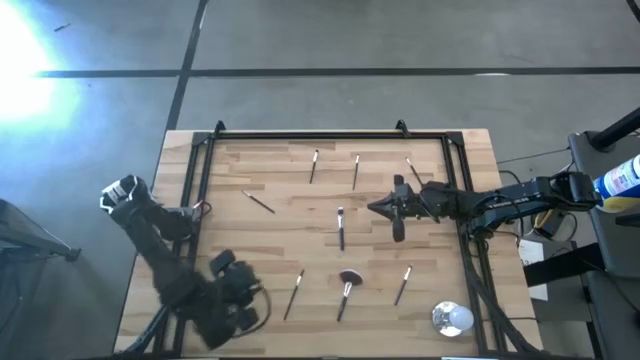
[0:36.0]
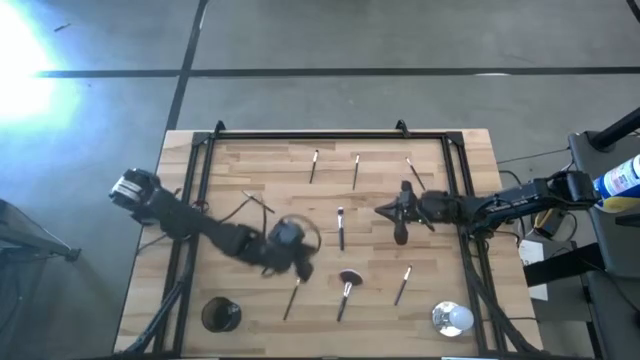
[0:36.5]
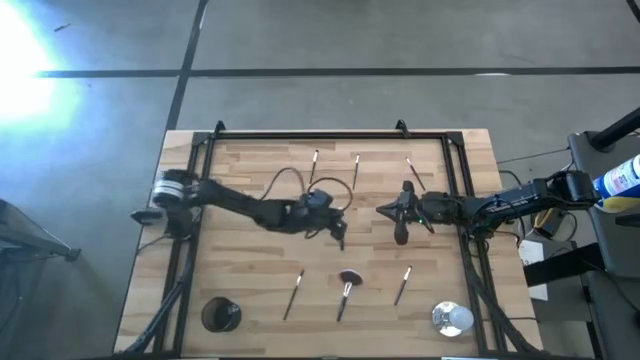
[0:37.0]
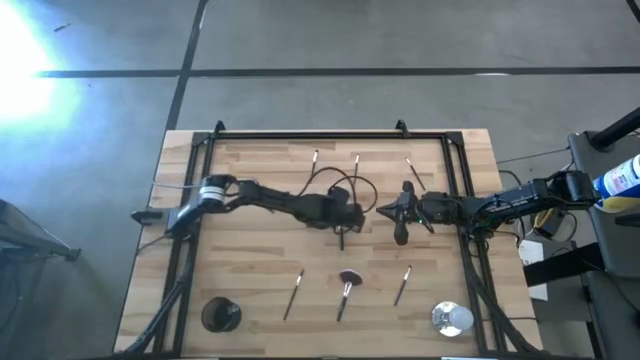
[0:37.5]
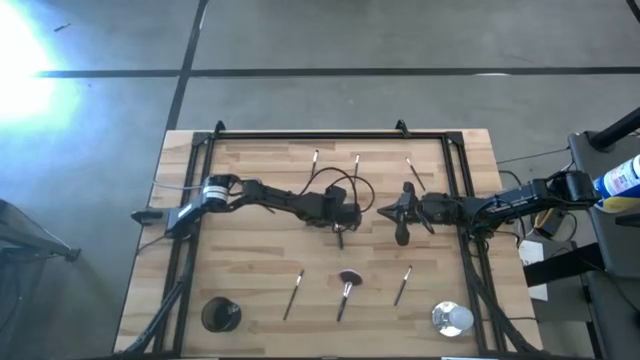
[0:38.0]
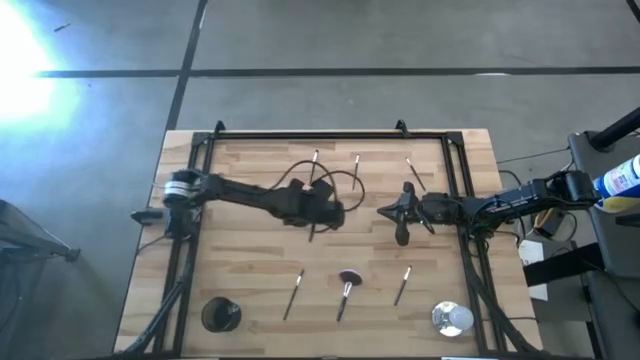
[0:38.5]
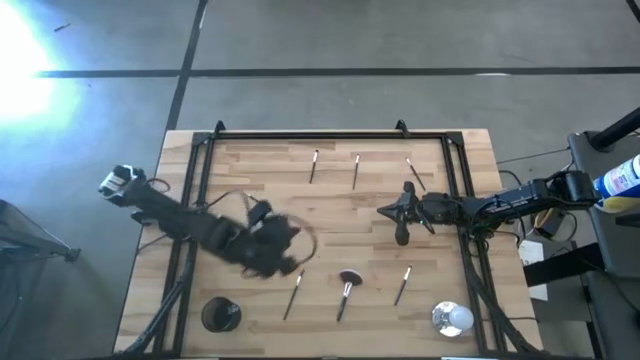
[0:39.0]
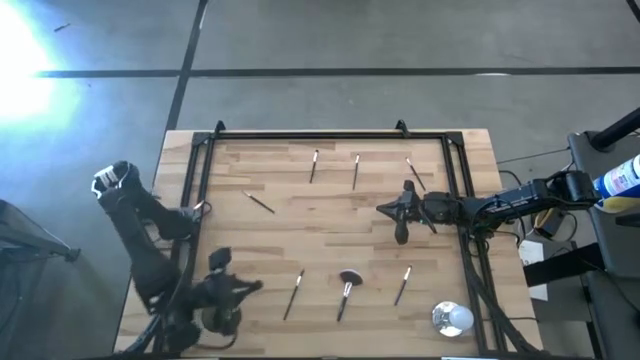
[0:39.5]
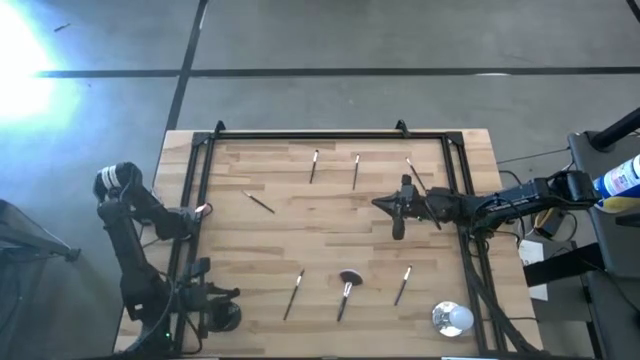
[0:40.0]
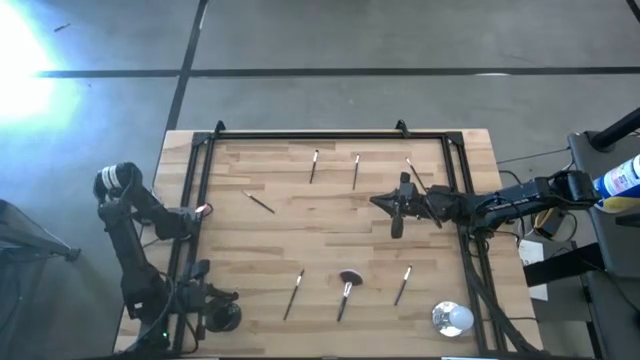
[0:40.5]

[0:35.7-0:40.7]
Task: Pick & Place Makeup Brushes
Put the black blush brush into the makeup holder

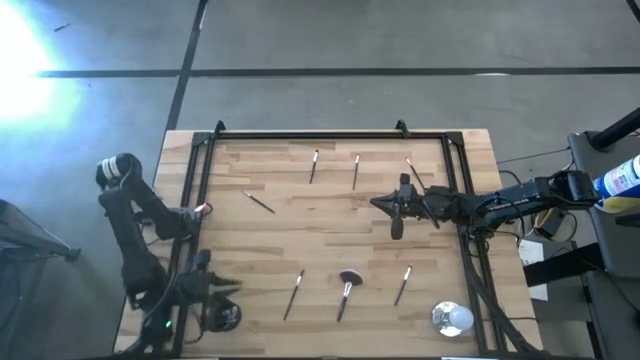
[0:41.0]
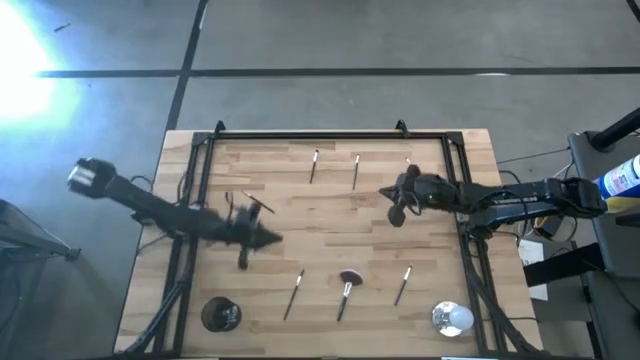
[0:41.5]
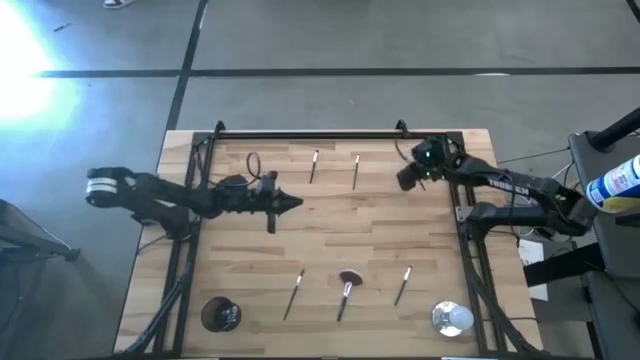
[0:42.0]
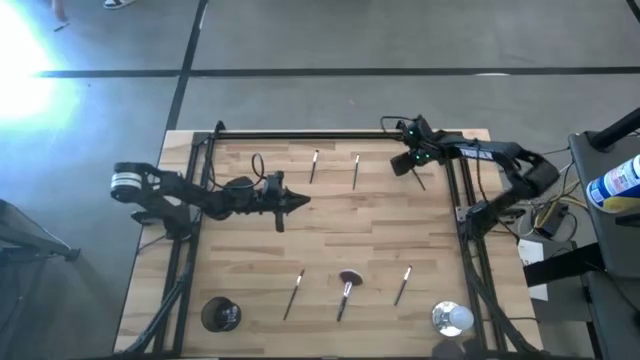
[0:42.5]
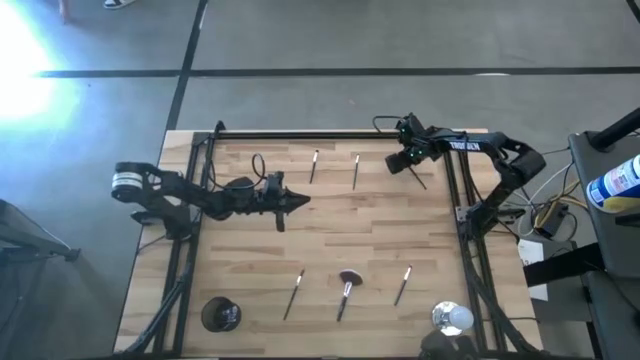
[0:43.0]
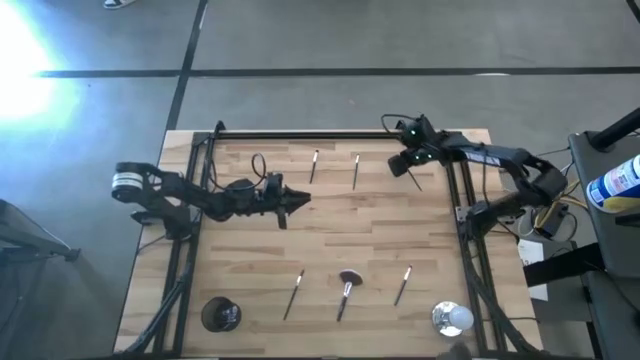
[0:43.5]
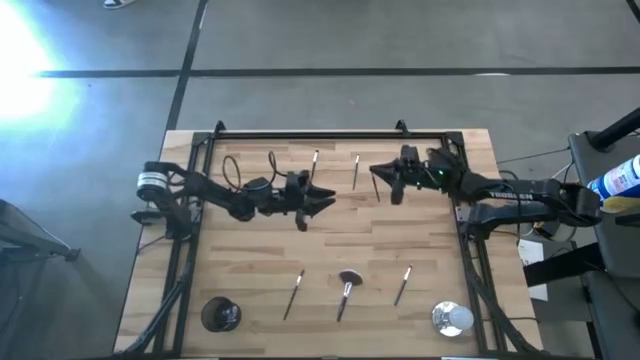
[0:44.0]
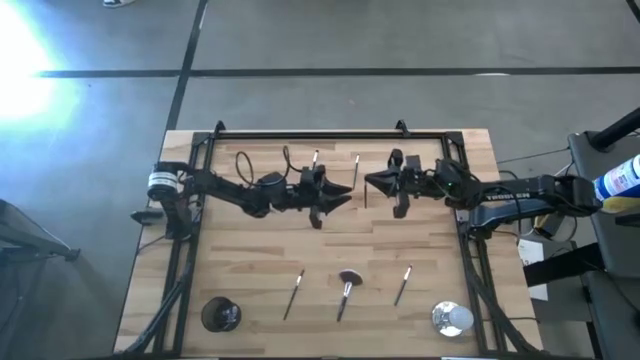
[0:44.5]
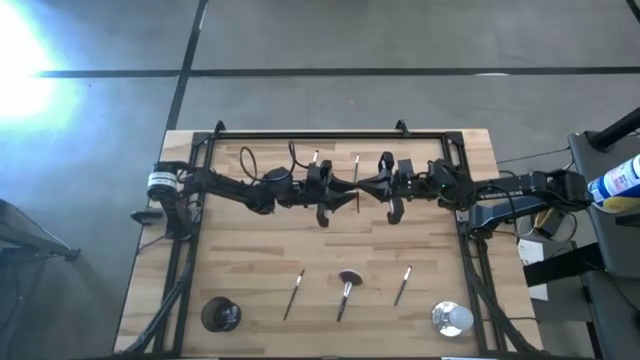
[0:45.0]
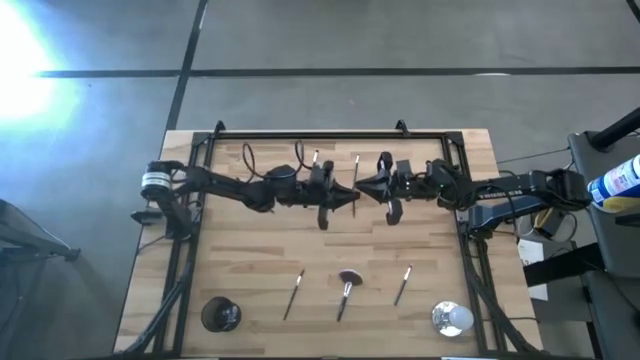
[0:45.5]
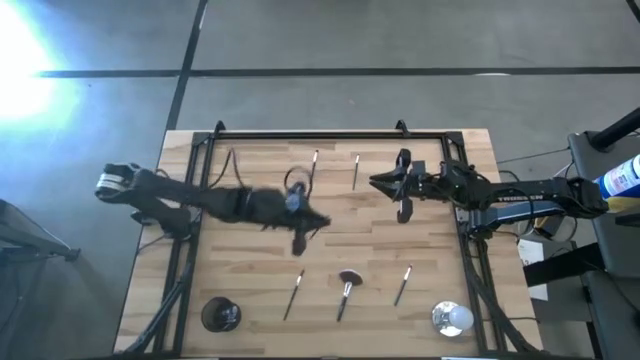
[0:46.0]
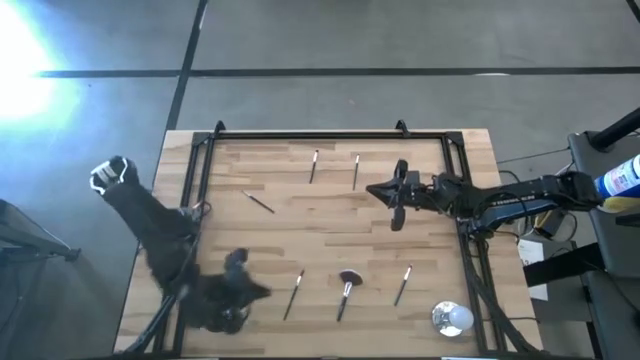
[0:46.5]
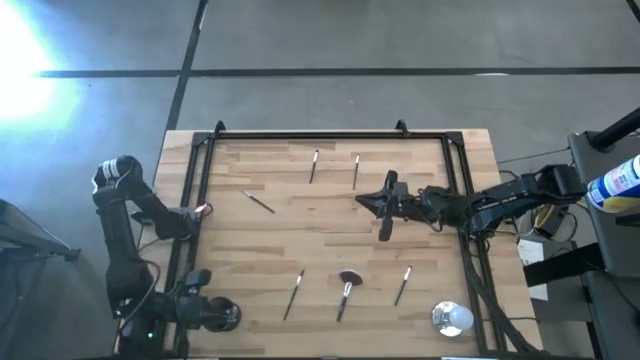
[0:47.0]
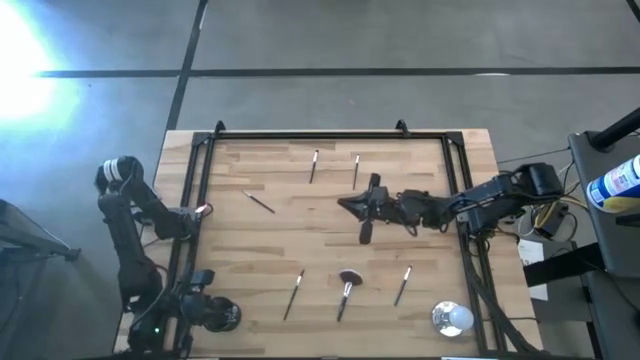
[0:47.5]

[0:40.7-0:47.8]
Put the black eyeshadow brush into the makeup holder

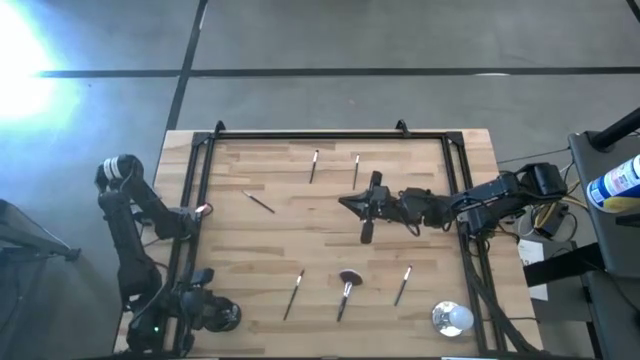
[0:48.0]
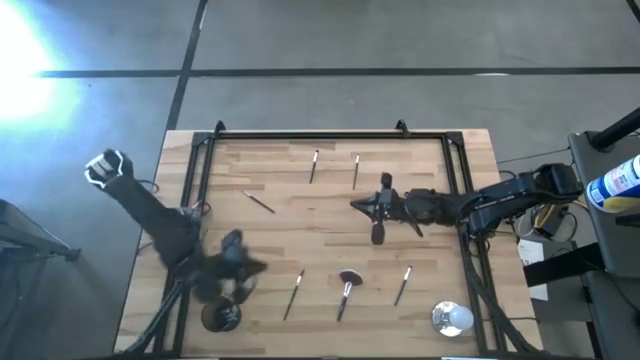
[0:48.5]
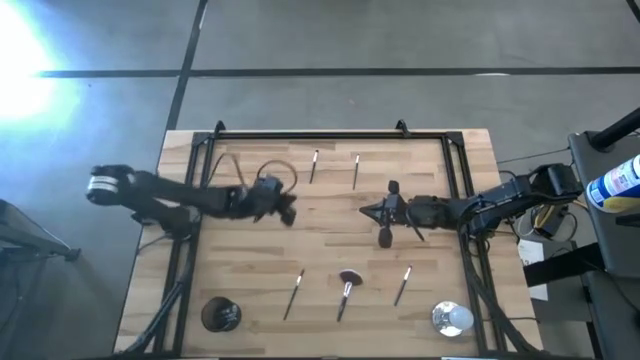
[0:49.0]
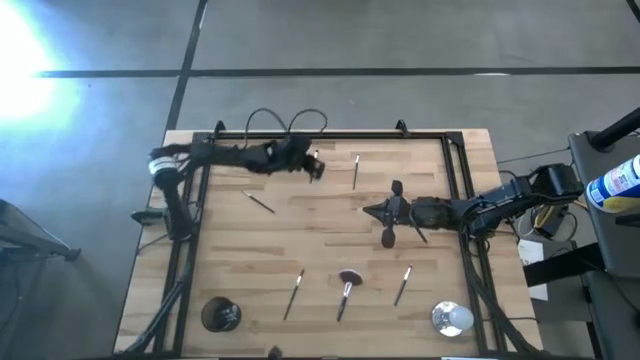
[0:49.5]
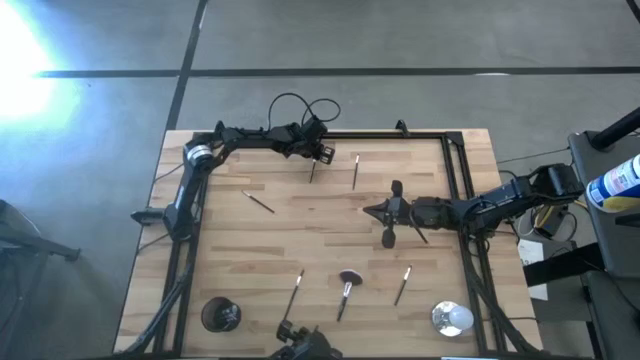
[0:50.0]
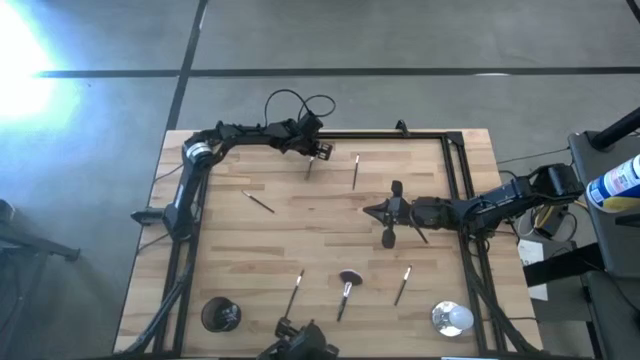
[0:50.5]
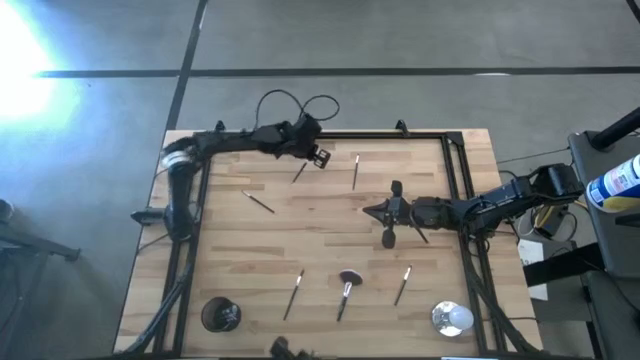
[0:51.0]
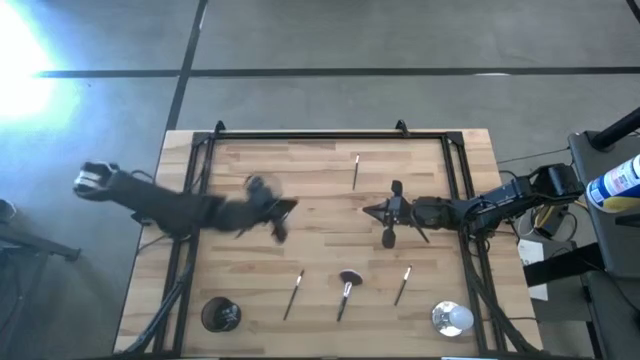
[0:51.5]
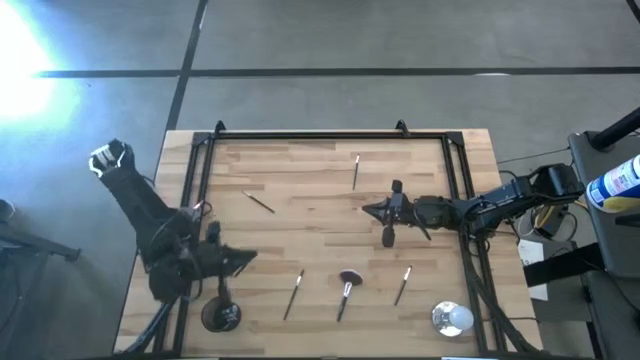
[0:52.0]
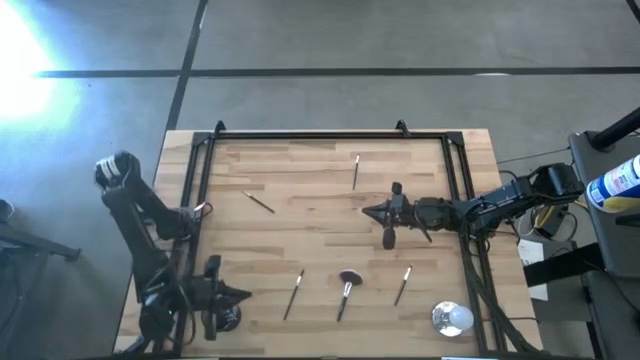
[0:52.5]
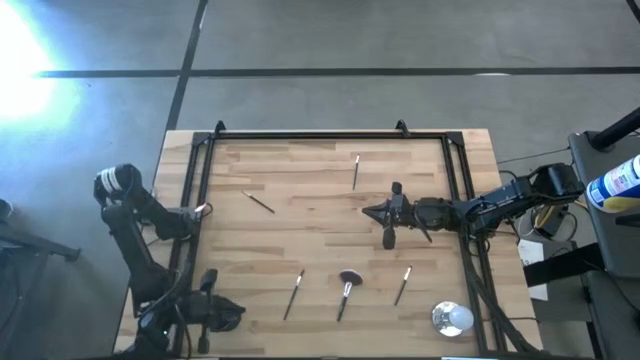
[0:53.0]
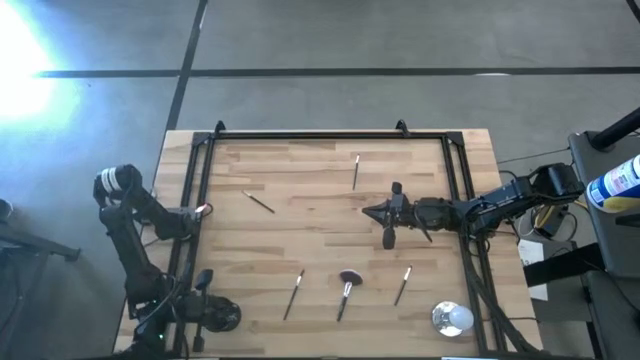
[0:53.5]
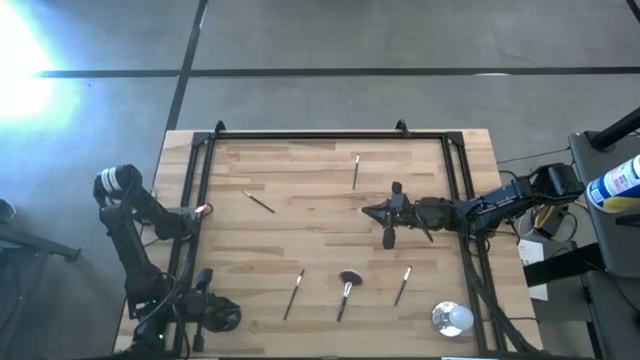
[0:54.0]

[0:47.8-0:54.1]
Put the black eyeshadow brush into the makeup holder

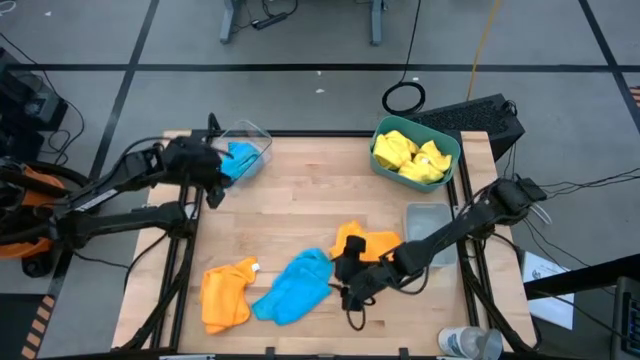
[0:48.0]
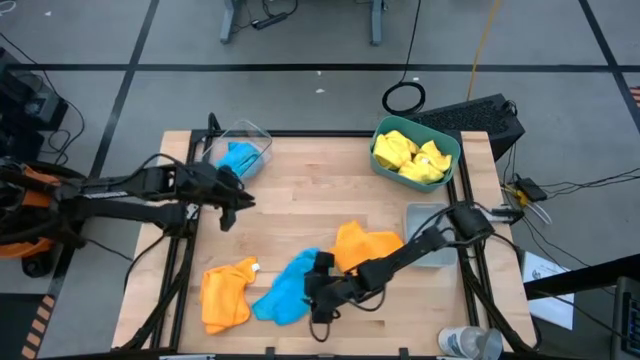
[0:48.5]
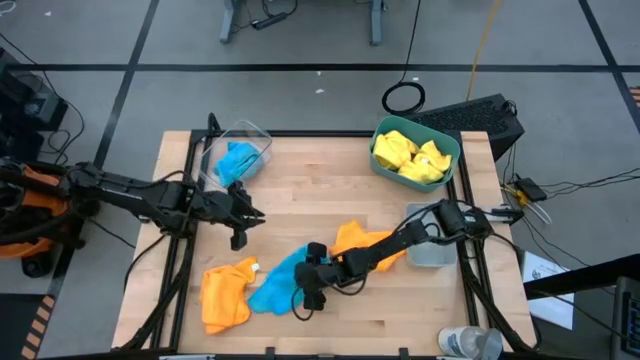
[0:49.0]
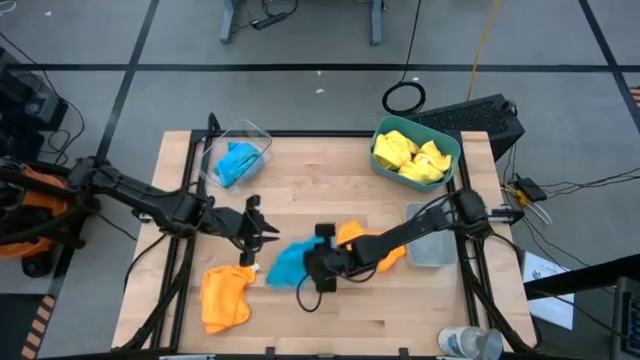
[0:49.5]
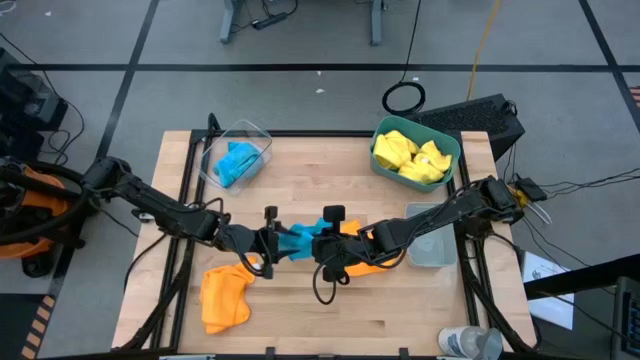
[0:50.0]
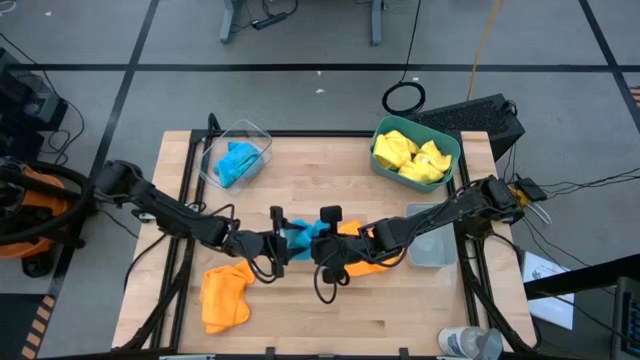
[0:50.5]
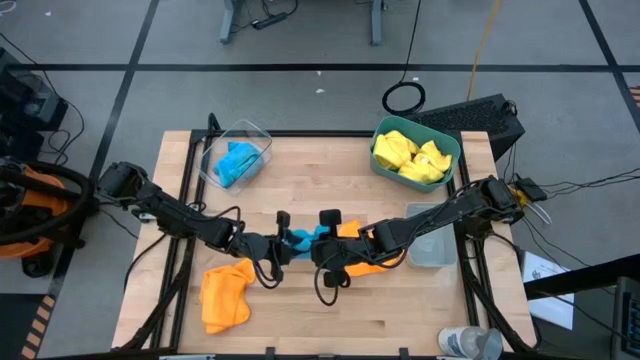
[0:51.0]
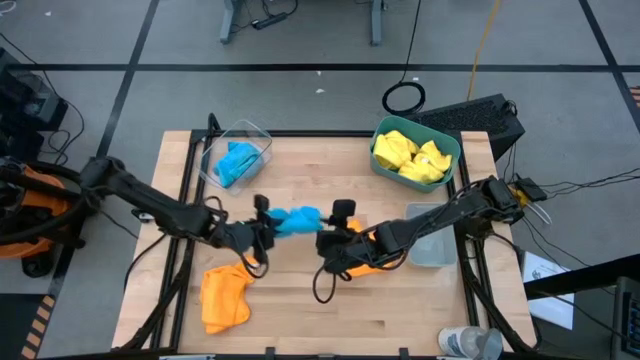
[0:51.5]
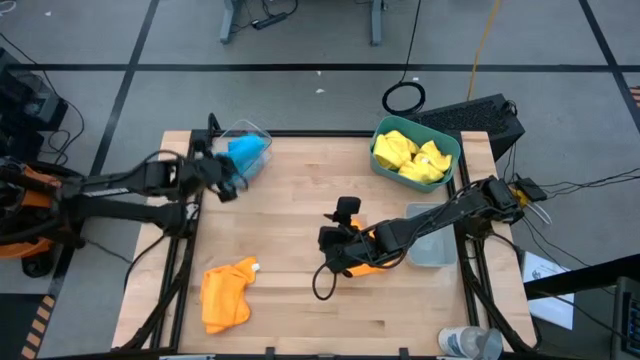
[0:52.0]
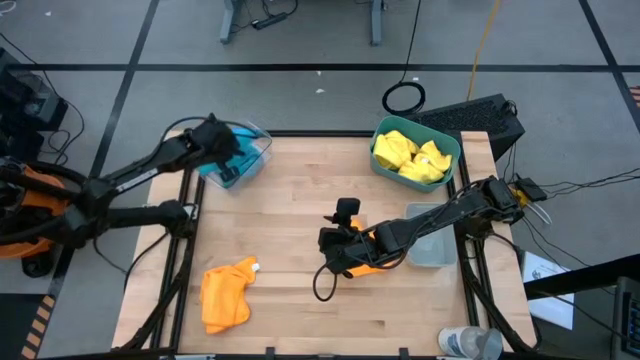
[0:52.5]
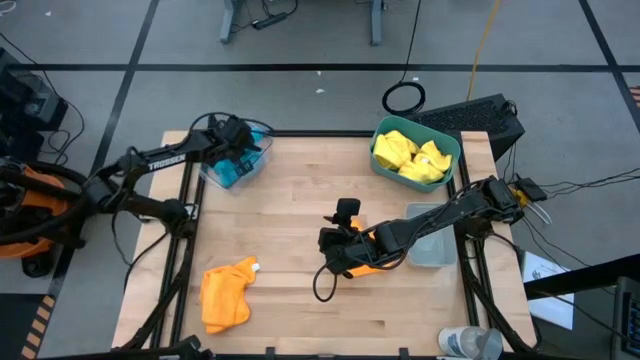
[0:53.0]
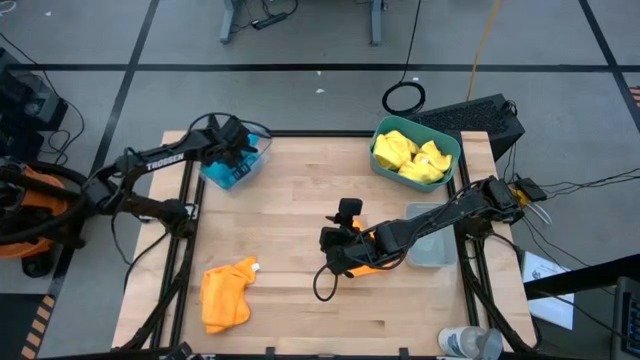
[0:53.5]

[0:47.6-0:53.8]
Task: Sort microfiber towel by color & place in baskets
Put the blue towel into the transparent bin
